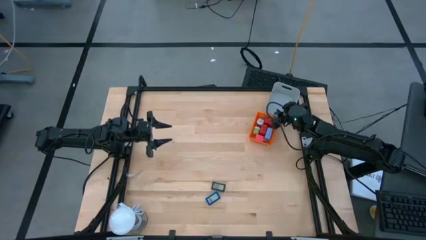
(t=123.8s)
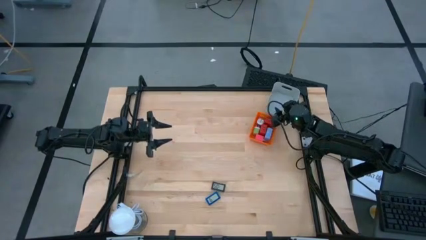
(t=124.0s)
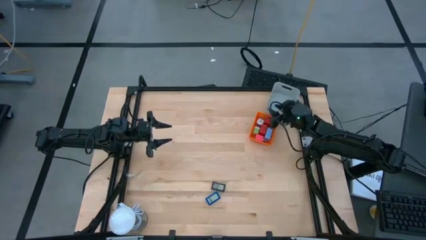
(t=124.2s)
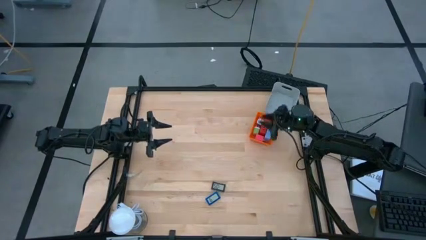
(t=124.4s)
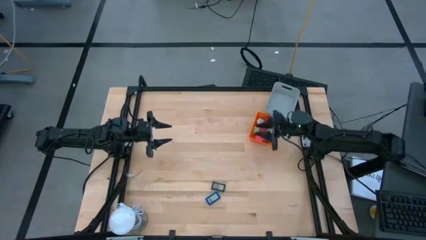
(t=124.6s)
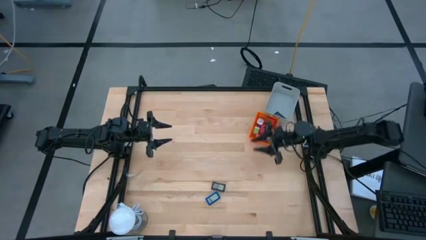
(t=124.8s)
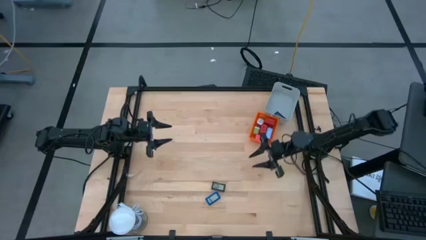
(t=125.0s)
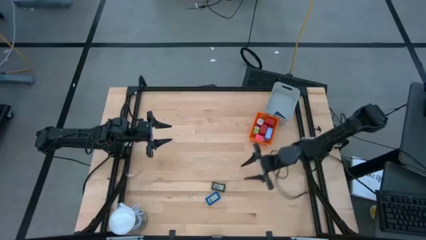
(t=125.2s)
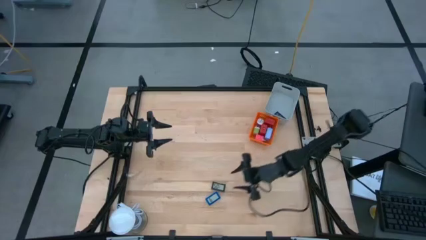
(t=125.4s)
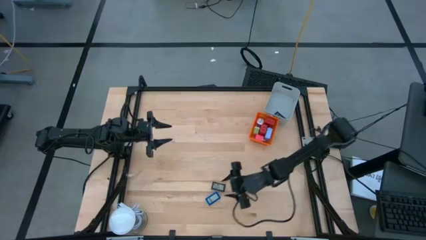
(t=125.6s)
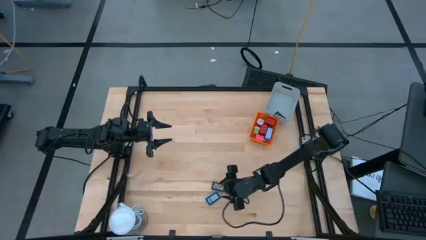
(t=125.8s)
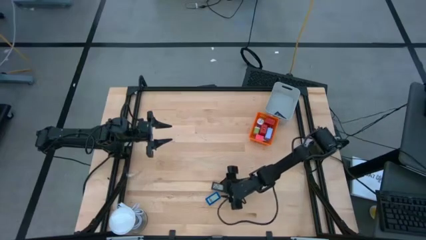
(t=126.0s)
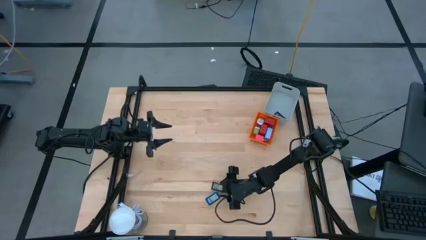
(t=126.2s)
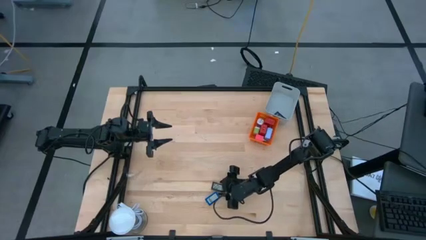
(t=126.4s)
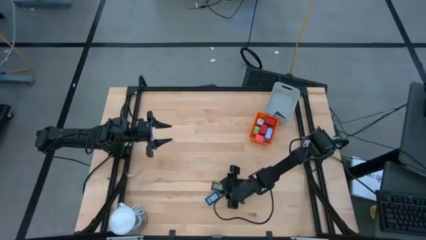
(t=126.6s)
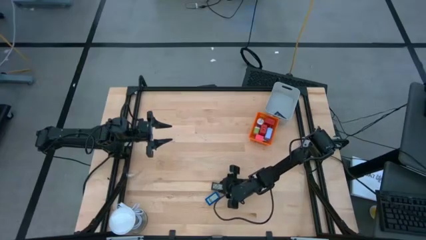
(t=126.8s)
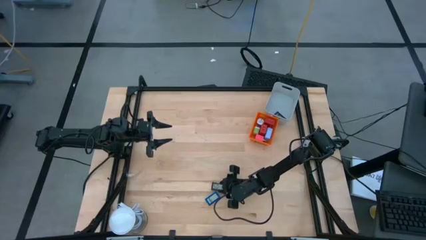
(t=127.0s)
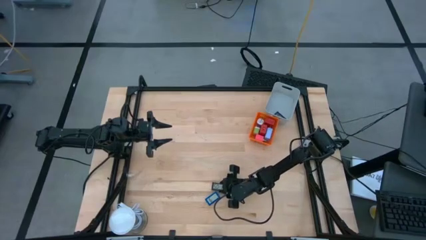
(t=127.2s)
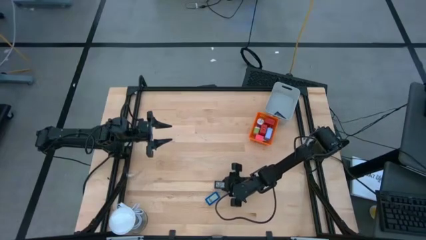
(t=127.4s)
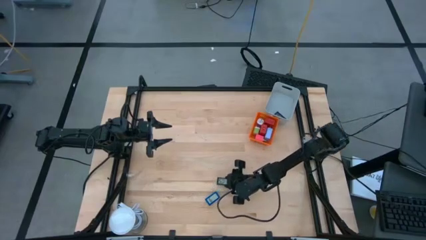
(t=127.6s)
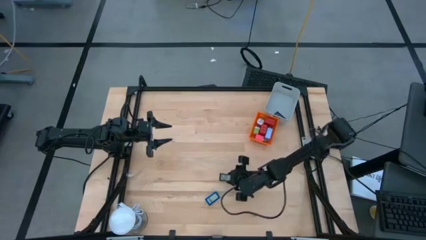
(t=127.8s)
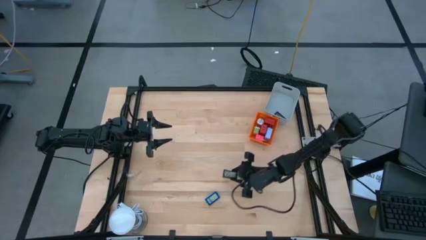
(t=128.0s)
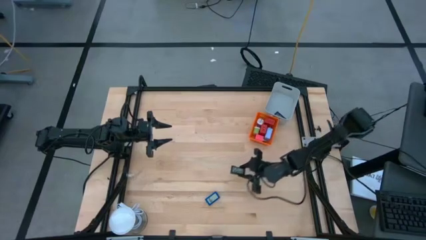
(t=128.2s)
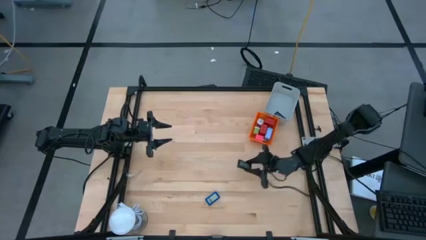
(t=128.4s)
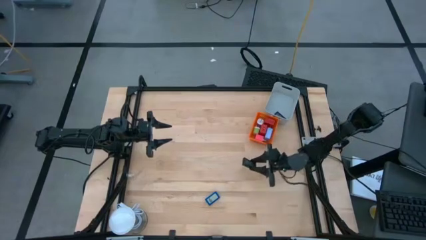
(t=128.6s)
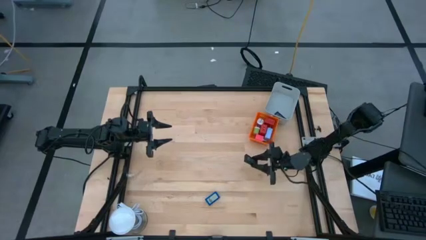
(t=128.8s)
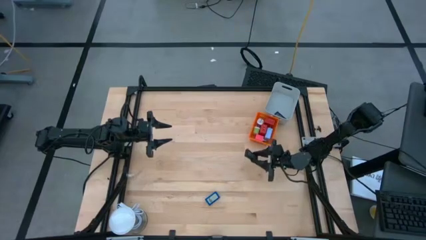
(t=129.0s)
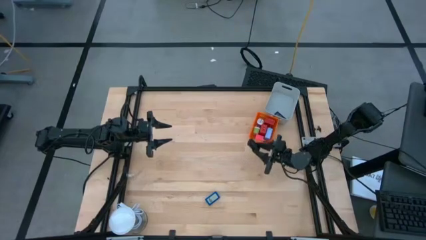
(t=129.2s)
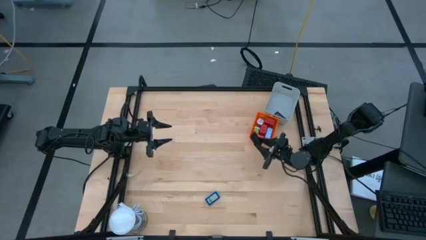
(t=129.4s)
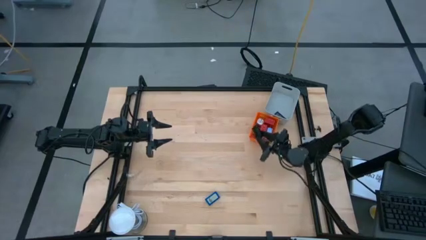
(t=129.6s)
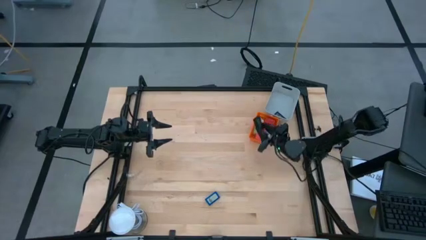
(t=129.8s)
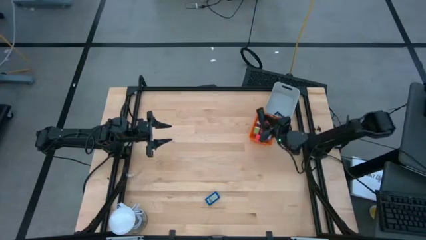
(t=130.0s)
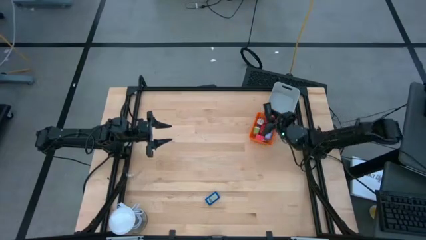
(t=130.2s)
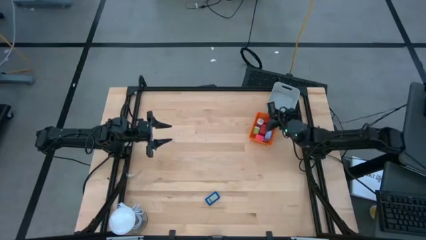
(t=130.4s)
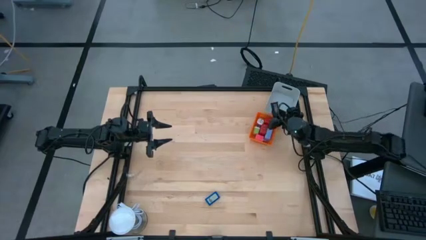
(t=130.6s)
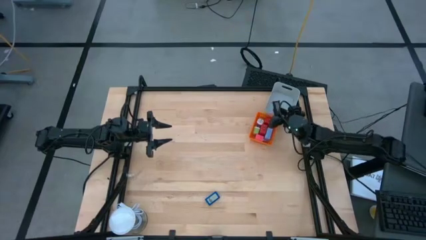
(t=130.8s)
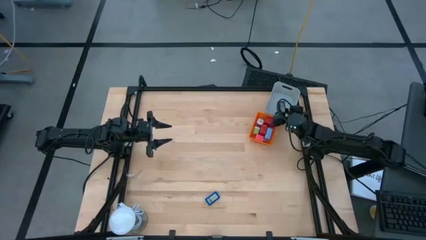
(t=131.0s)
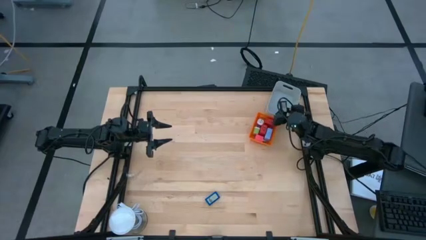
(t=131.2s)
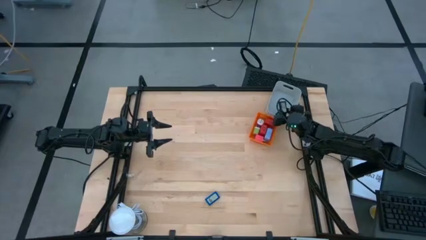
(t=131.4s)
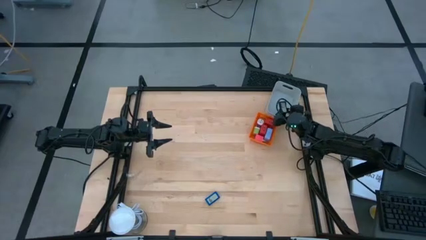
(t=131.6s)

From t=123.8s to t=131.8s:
Task: Pick & Place Office items
Put the black digital clock into the gray bin

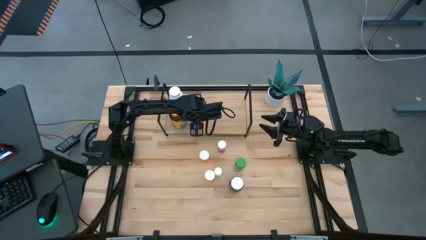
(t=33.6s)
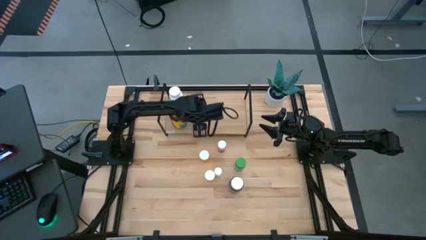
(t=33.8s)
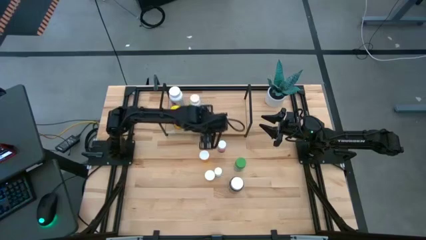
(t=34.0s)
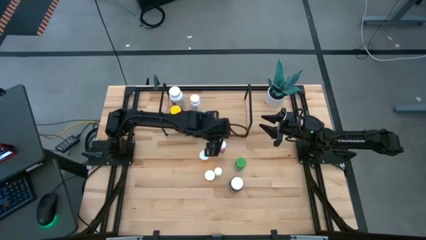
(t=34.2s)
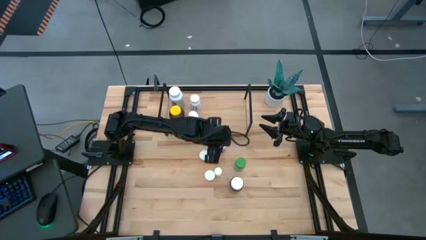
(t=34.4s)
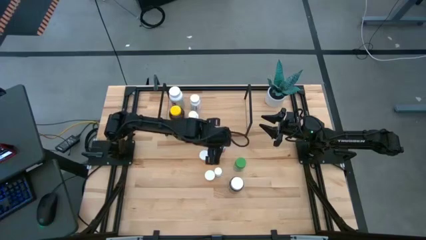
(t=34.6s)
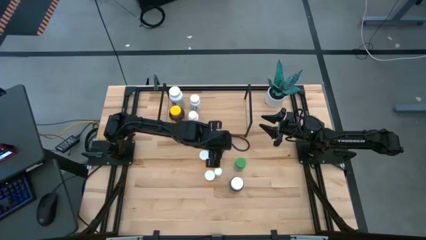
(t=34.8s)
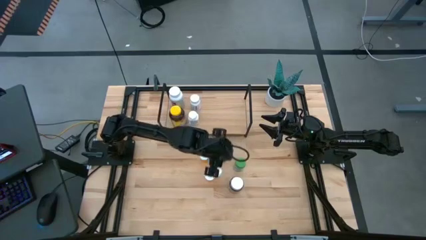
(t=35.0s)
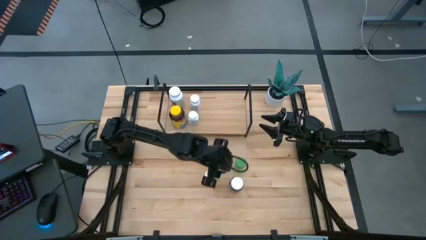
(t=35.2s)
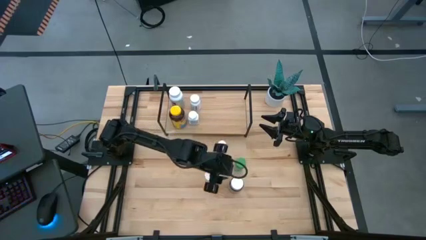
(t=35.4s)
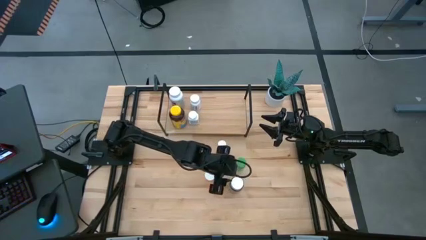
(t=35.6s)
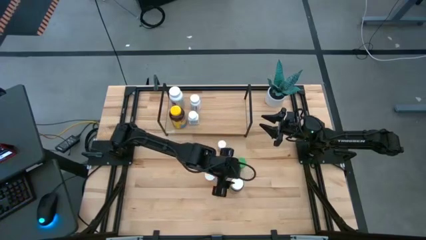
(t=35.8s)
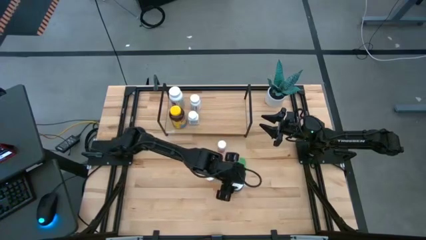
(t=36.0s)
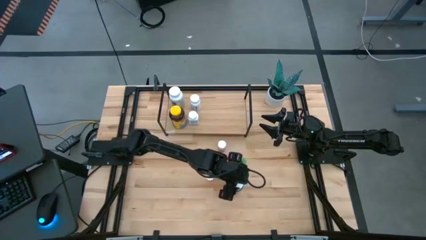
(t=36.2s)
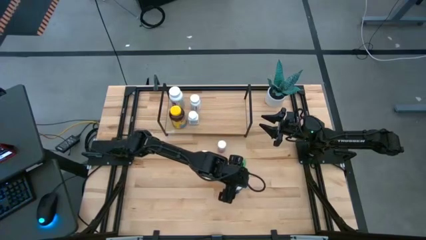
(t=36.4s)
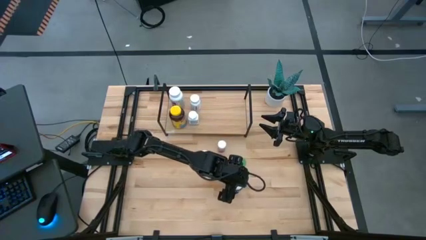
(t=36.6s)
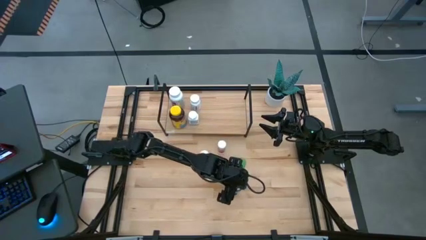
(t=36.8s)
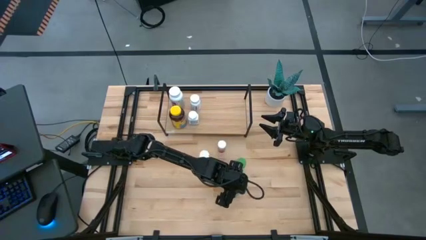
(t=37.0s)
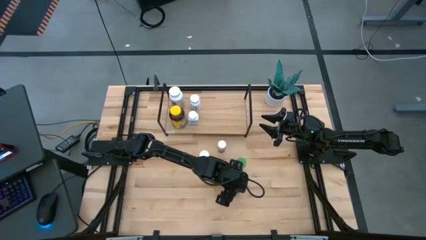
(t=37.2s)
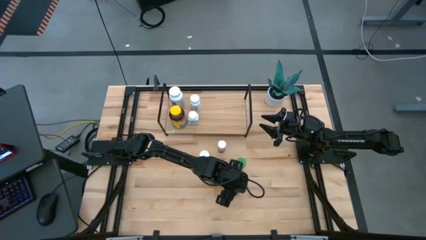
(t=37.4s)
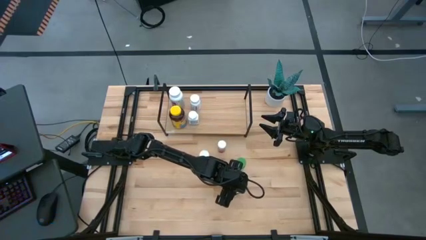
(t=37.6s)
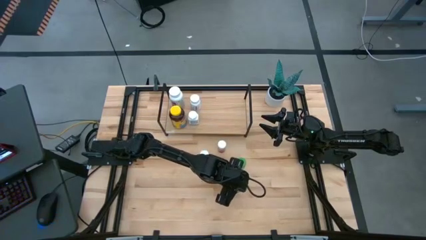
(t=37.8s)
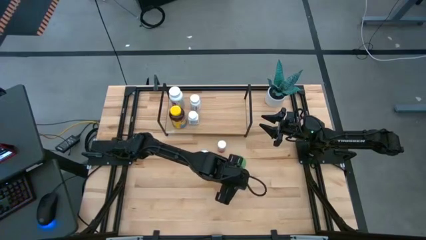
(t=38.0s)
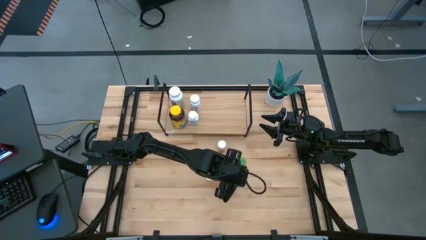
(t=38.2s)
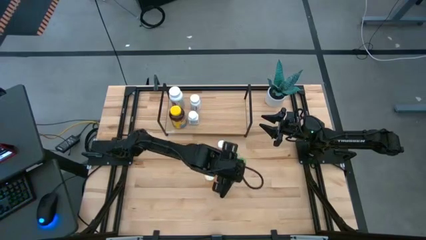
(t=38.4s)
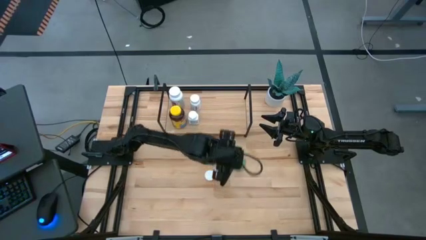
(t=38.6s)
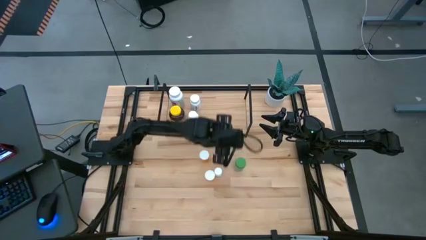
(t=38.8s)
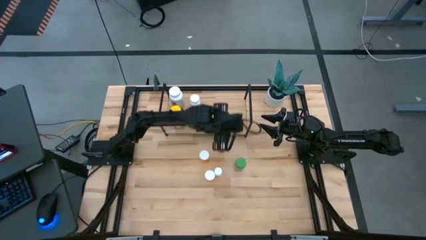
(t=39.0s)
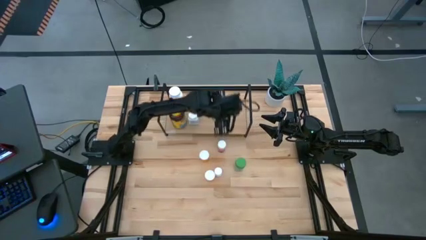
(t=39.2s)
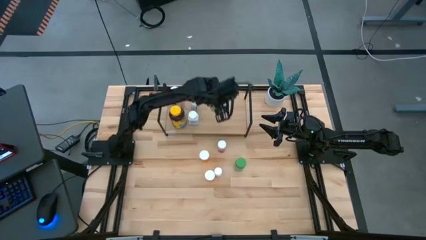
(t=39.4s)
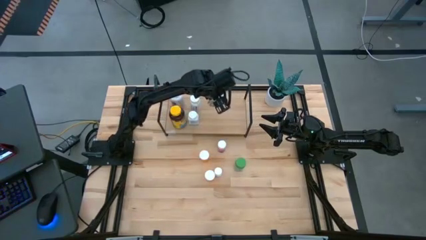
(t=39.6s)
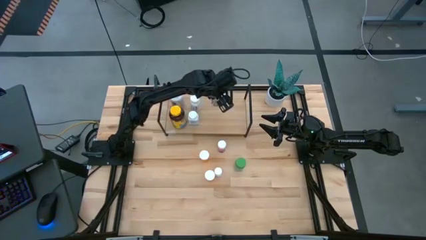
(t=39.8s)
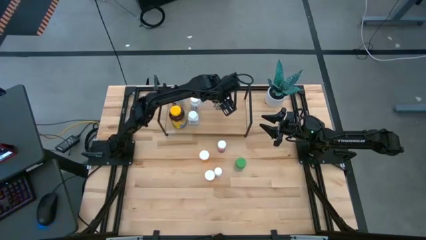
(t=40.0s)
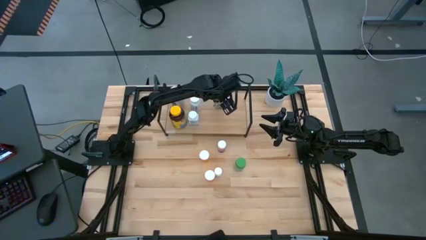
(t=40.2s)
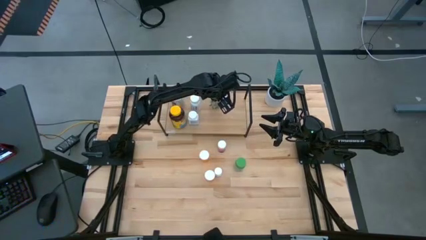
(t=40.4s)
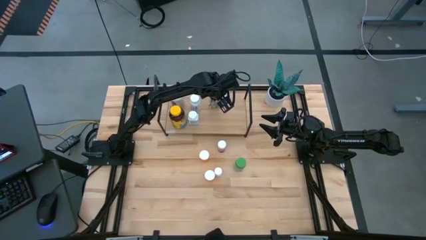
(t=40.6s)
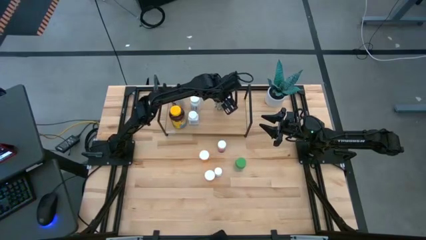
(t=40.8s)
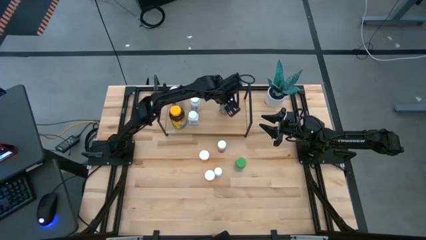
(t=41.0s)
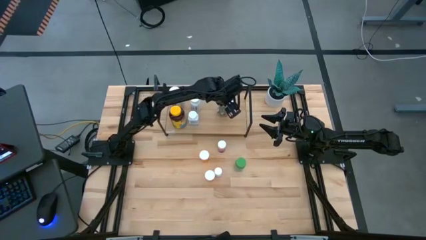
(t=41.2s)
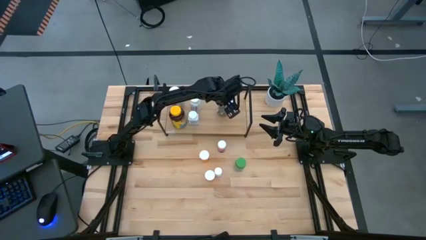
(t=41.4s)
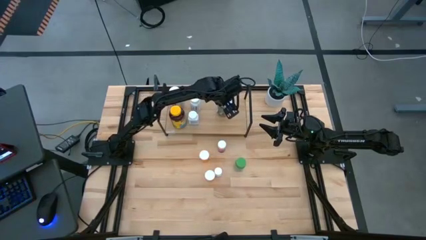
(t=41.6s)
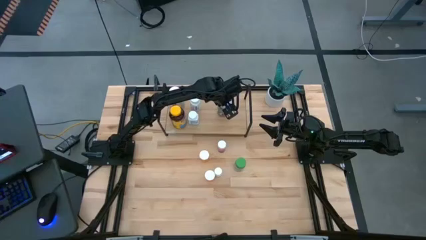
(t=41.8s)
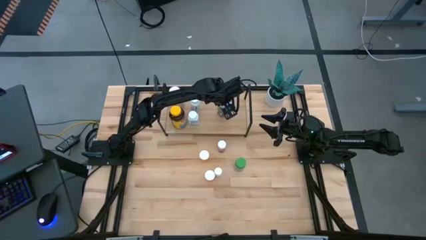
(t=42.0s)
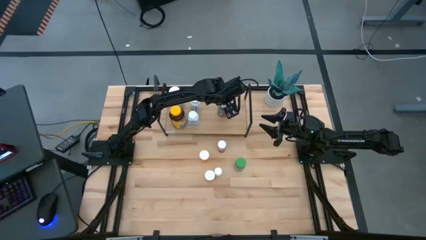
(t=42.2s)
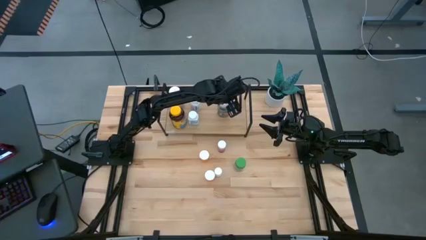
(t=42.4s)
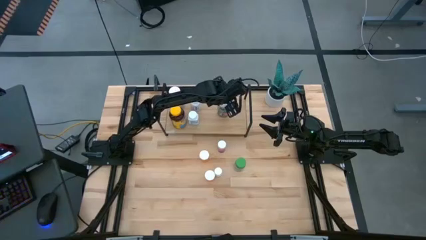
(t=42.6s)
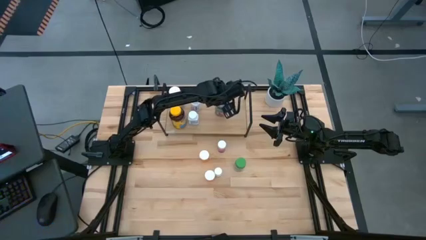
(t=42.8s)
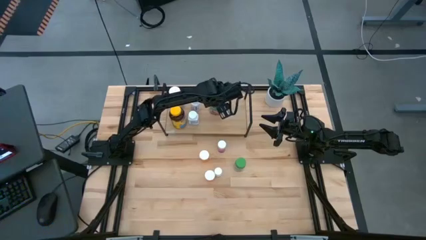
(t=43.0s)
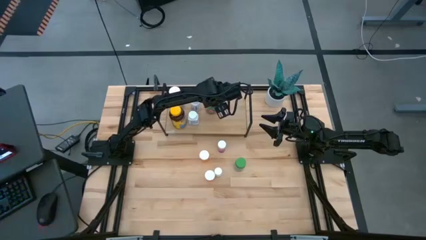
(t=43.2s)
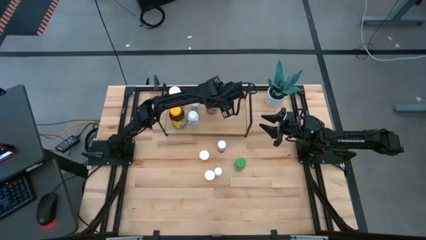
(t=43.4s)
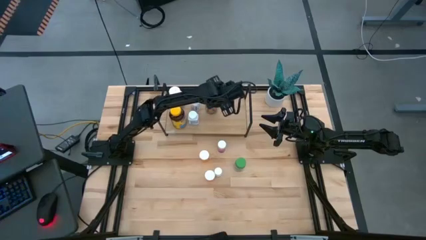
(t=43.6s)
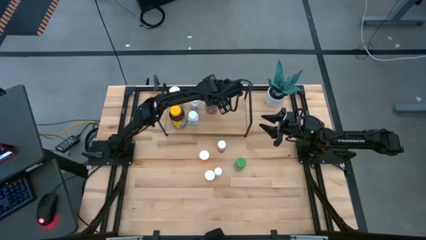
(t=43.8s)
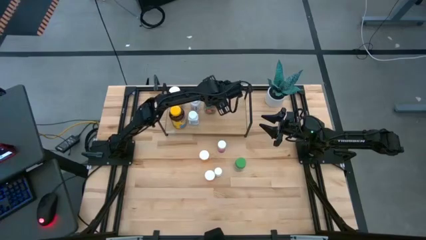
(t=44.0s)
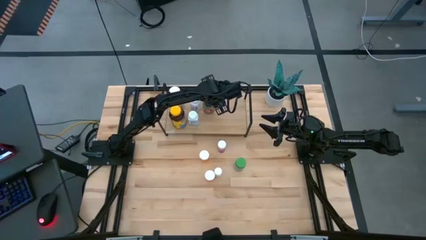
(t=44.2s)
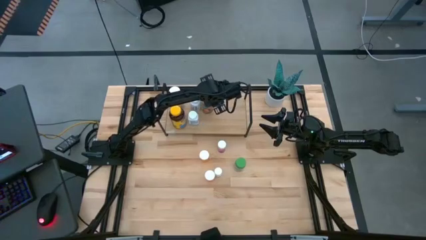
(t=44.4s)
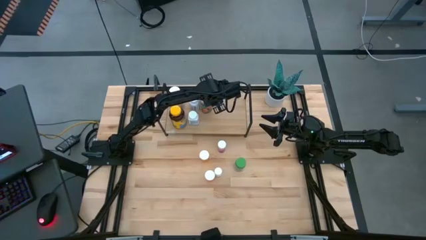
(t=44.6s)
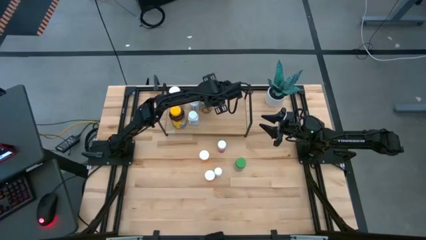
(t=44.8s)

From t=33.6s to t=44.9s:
Task: Pick and place medicine bottles onto shelf by color
Put the dark green pill bottle on the shelf
